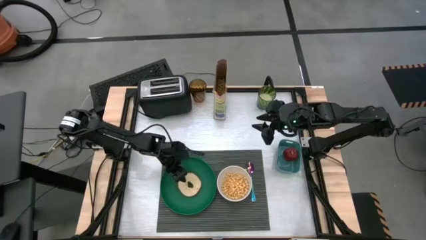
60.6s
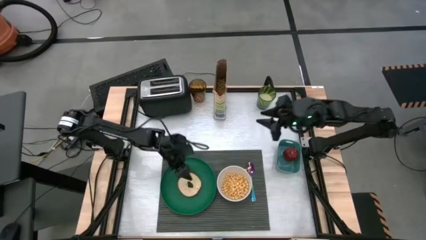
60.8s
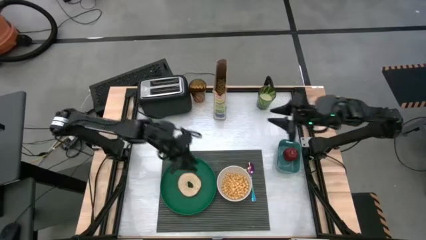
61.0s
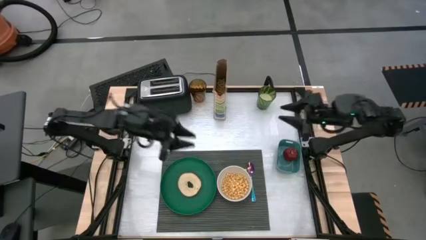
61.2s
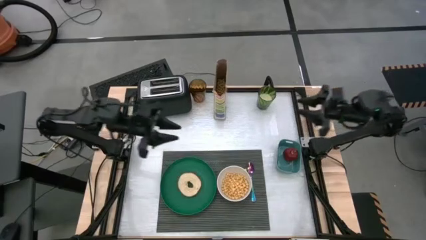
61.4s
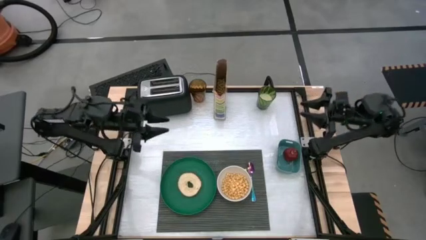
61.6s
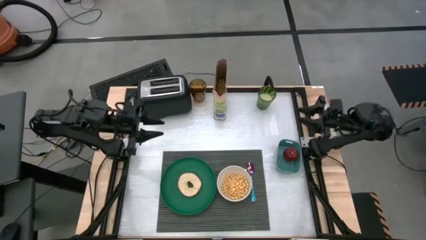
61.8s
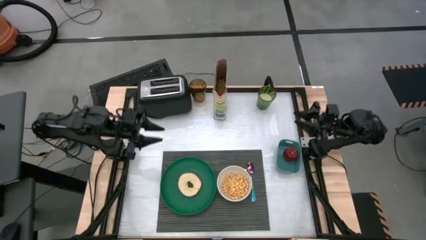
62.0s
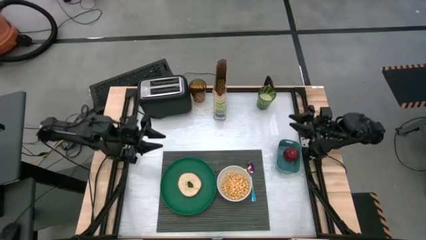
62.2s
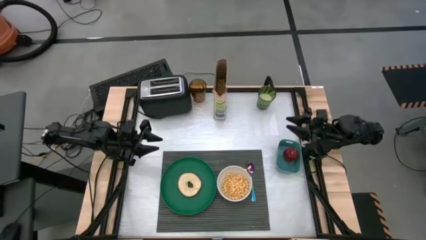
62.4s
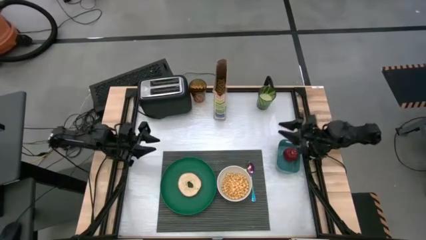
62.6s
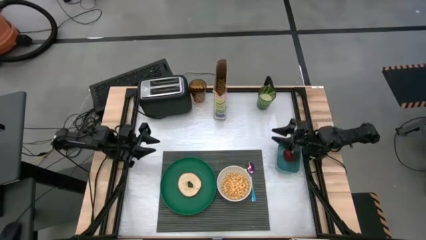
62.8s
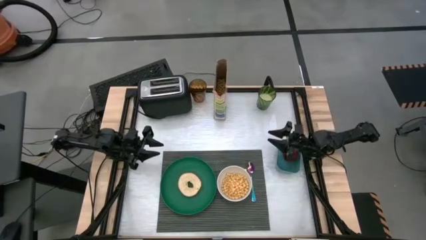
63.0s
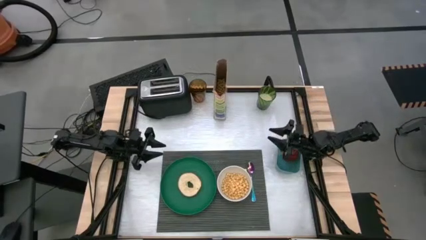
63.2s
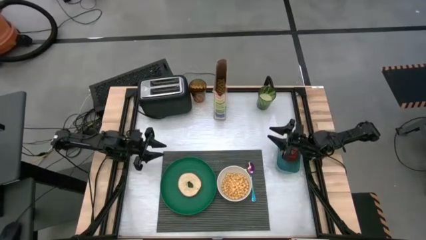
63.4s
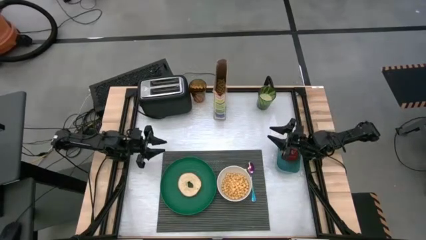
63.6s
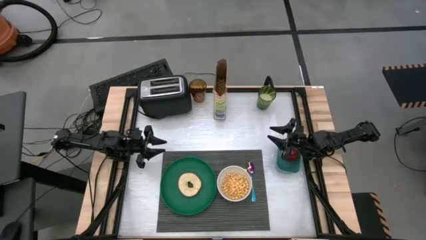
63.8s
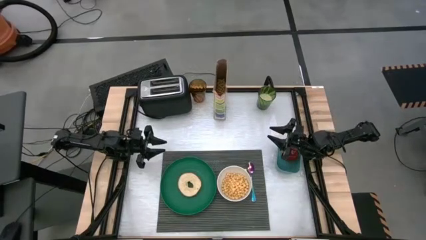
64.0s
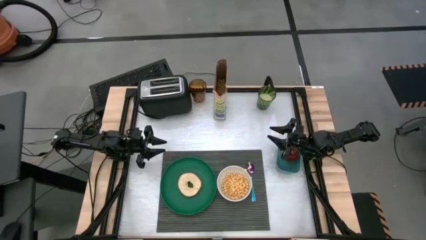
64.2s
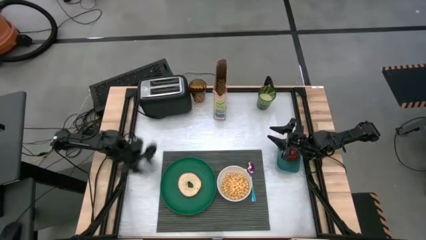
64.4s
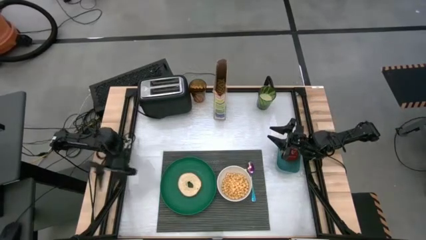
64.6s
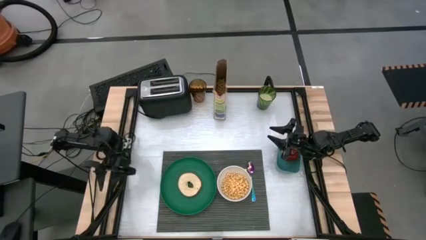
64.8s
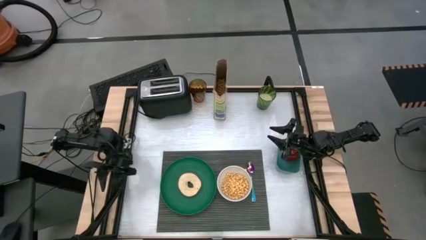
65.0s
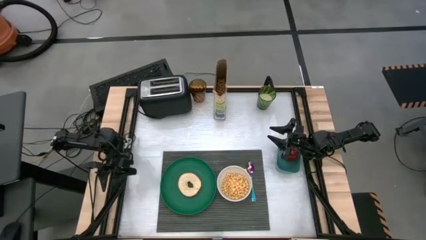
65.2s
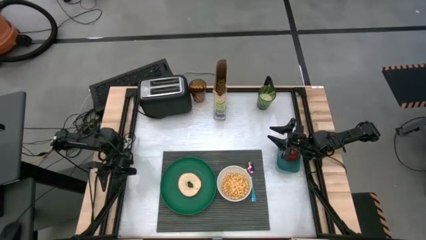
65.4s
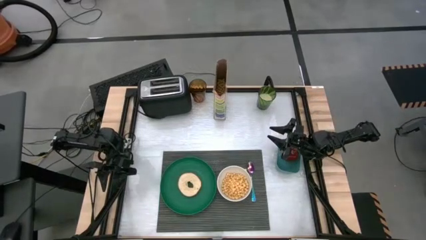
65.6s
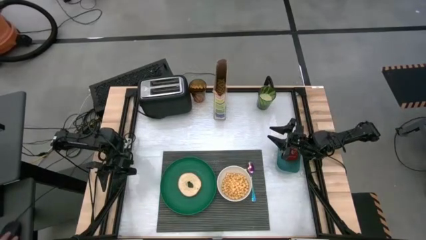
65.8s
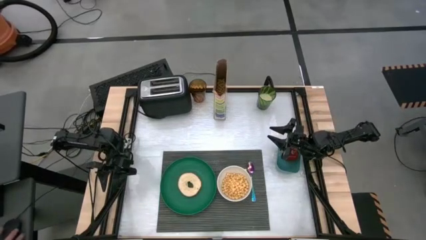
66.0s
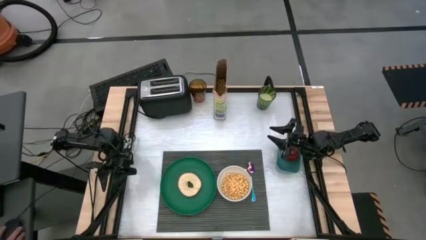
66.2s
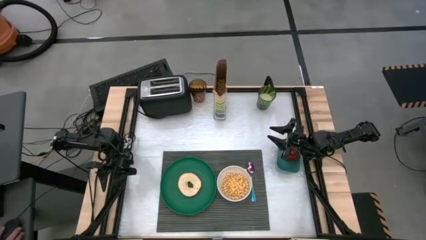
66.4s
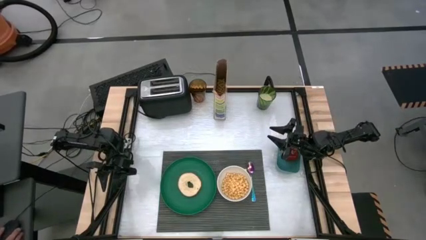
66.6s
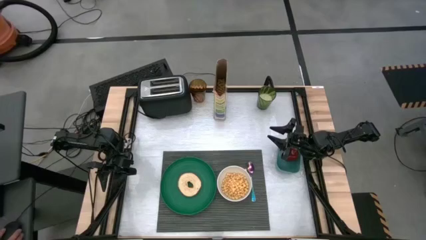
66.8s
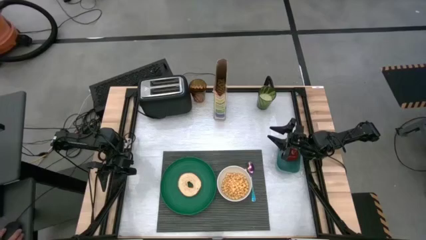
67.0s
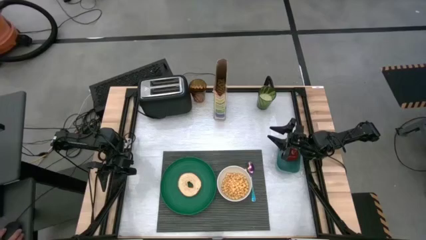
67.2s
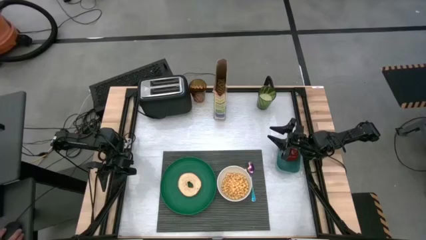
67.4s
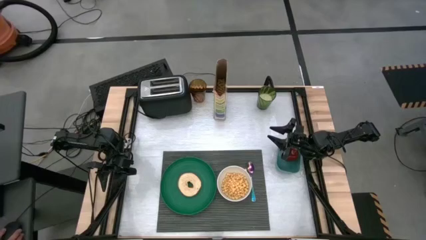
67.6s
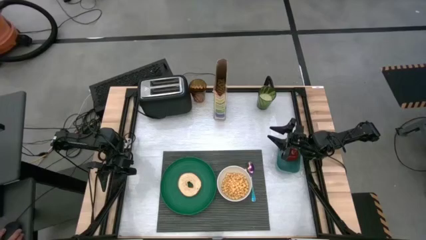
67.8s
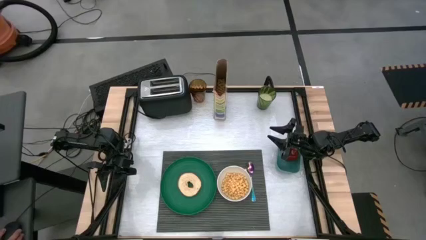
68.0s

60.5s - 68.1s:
Task: Arrange a breakfast setting
Return to Home Position

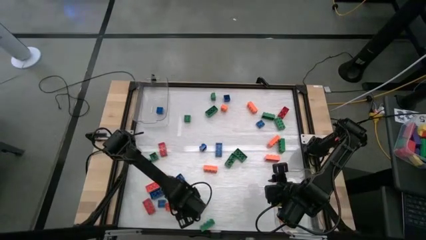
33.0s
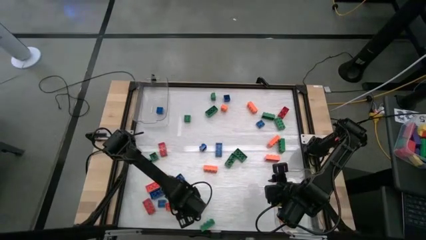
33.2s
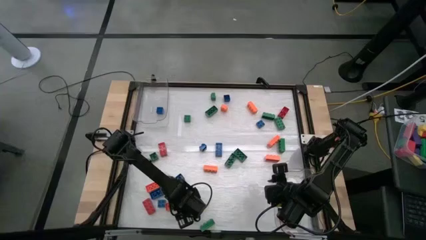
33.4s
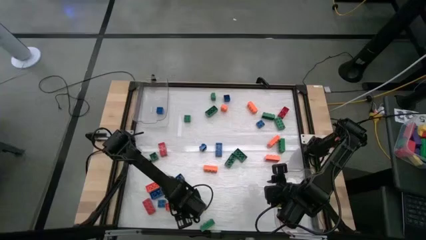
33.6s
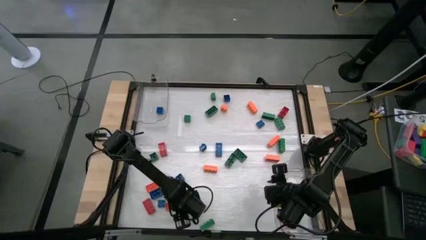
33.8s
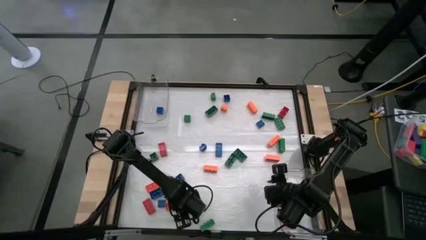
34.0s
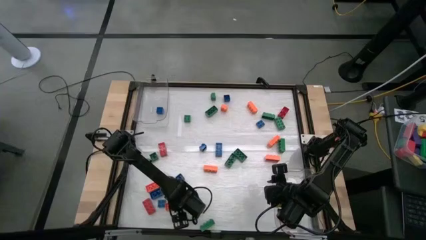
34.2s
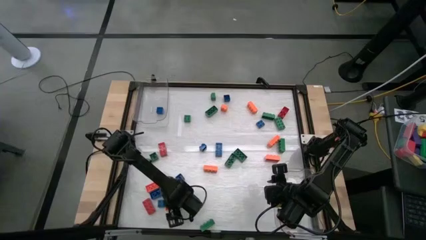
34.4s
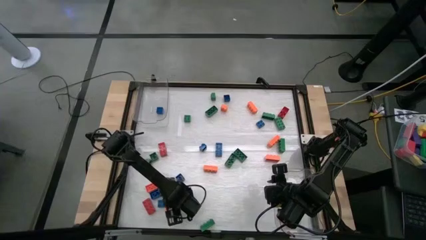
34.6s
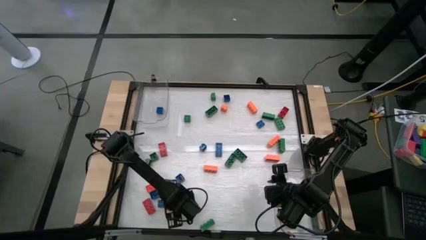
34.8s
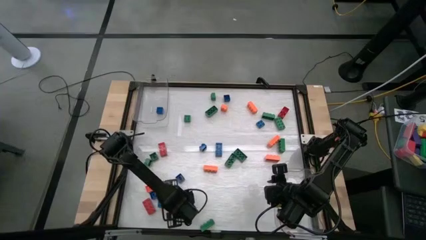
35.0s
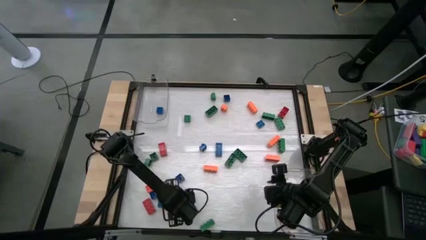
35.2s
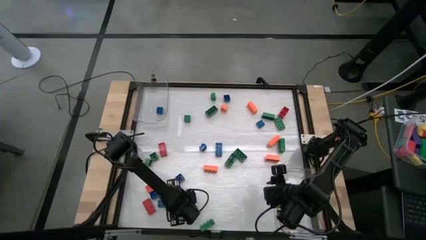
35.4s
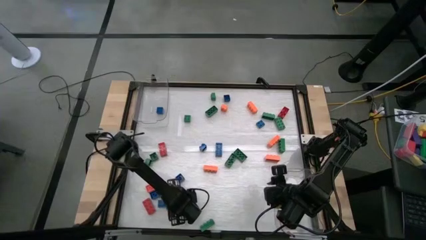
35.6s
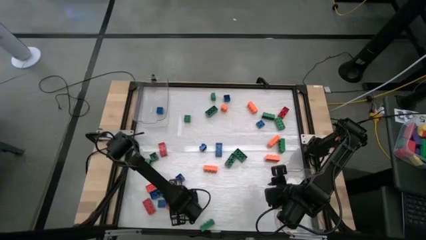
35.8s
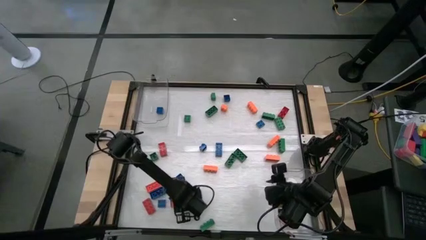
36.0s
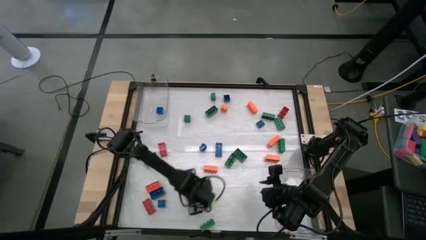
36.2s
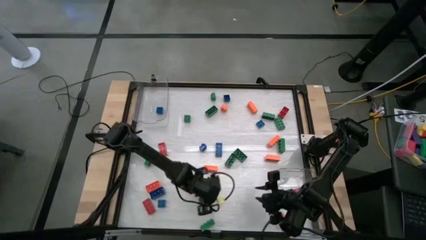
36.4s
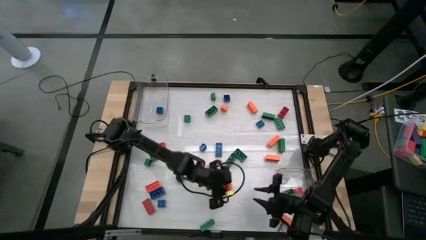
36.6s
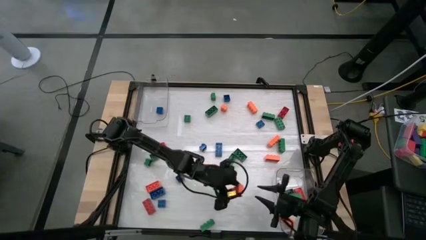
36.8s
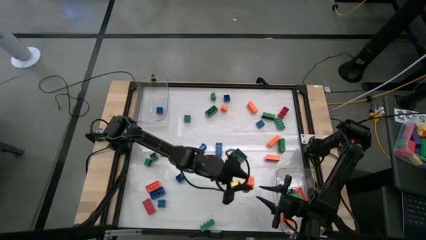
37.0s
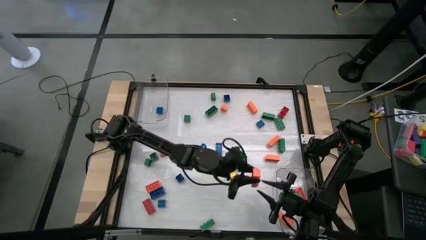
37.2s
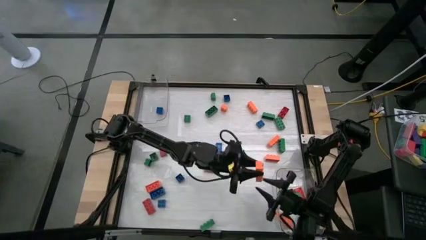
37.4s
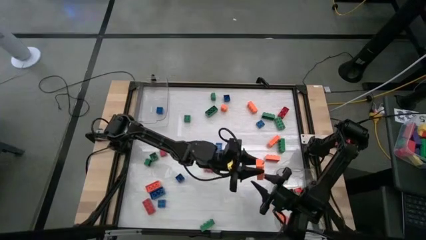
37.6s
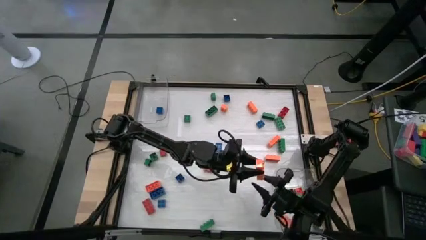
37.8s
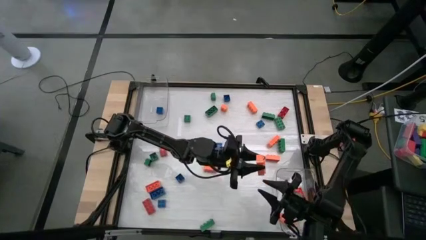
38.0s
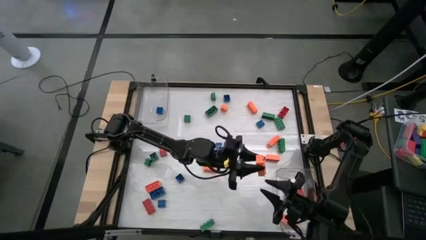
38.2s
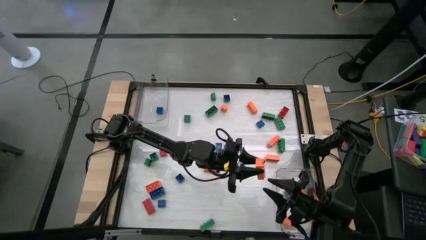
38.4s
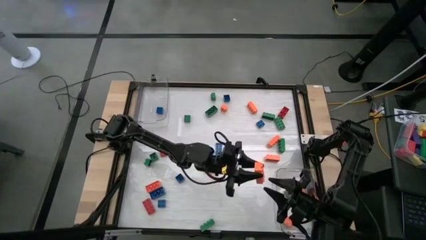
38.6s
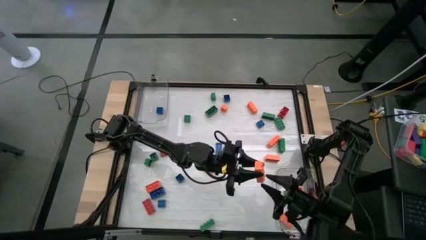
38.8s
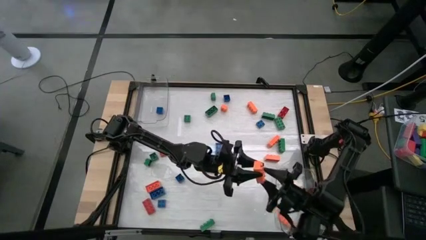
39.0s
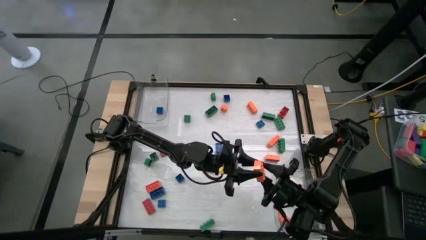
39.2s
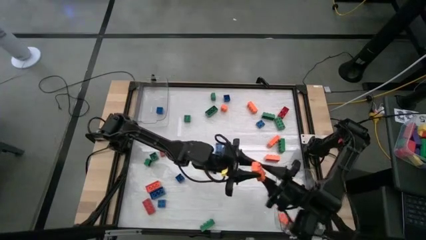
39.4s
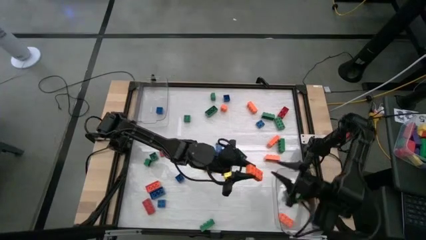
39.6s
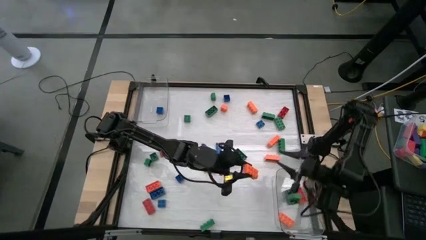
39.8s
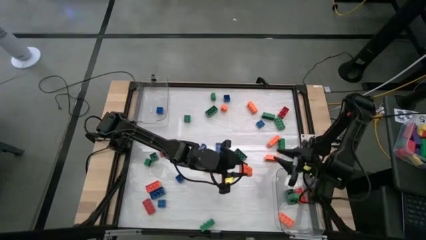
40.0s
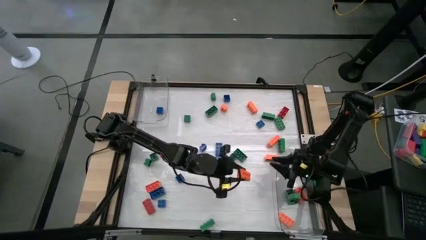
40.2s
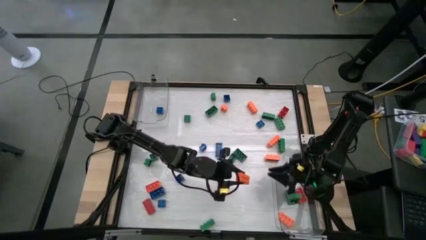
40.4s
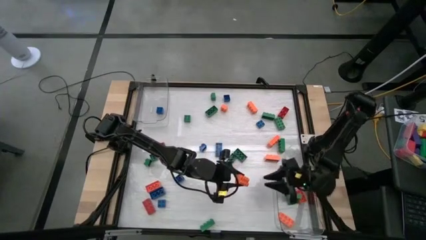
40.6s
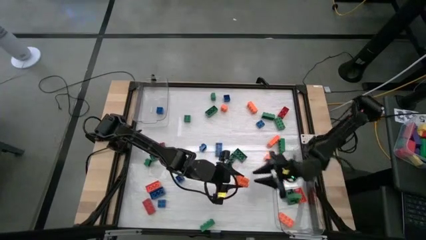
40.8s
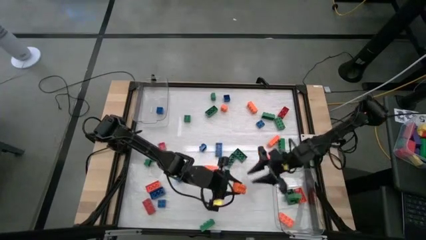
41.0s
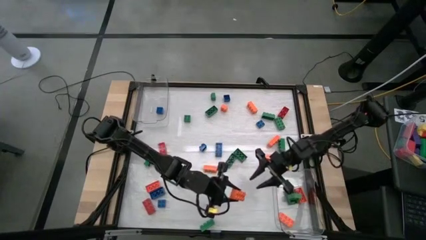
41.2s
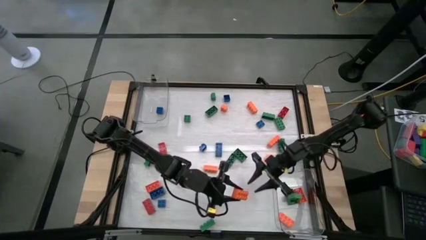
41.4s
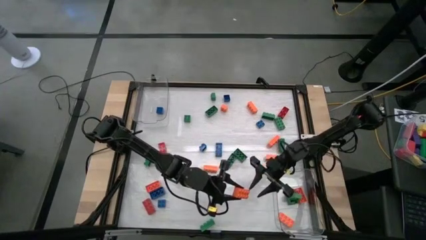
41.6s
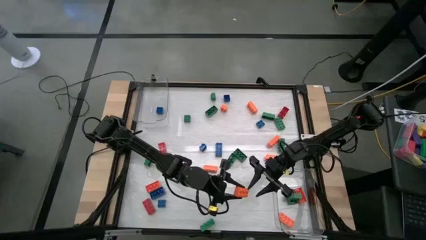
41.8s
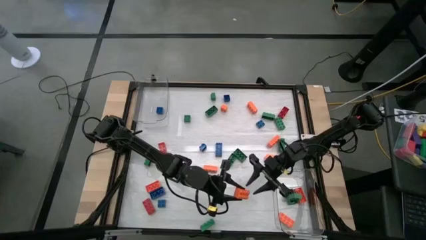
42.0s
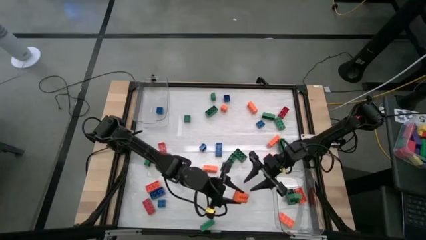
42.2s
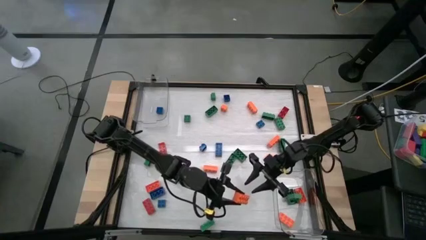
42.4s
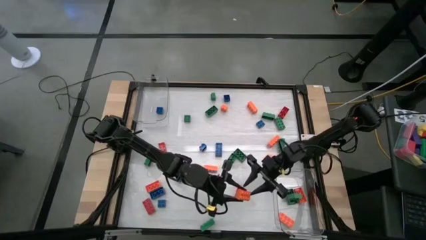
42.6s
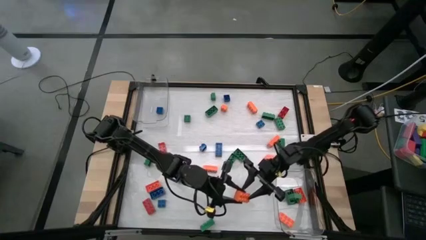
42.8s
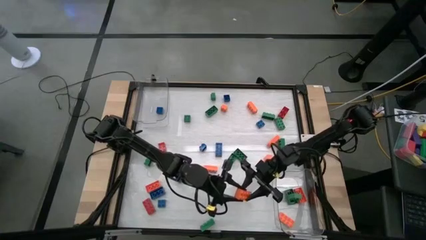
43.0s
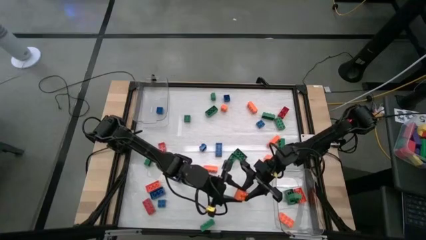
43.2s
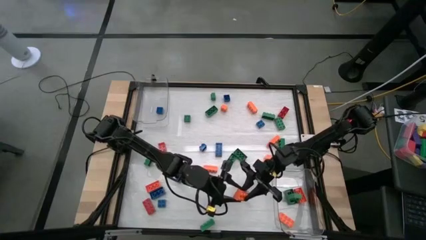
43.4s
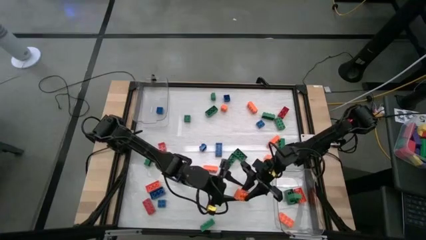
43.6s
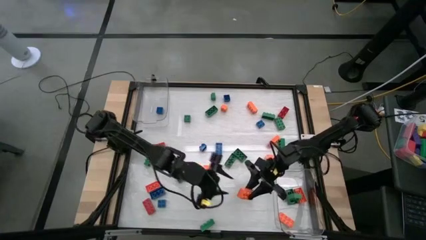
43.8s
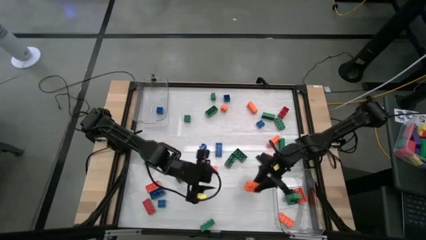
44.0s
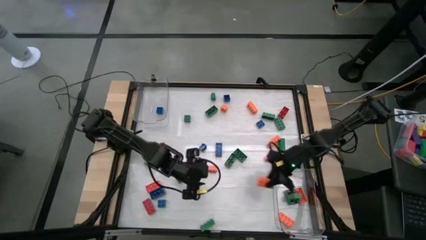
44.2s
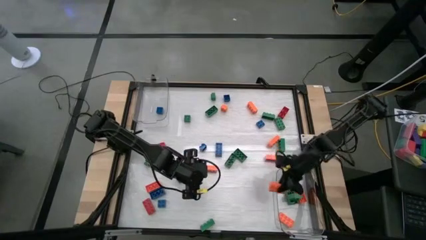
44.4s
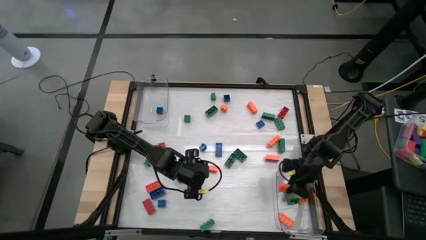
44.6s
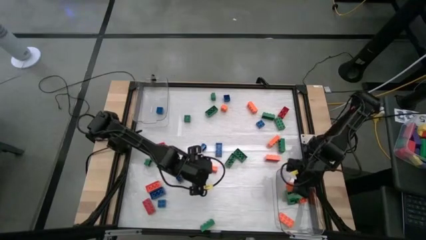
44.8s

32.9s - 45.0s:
Task: Sort blocks by size
Put the 8 stud orange game piece into the bottom transparent bin
